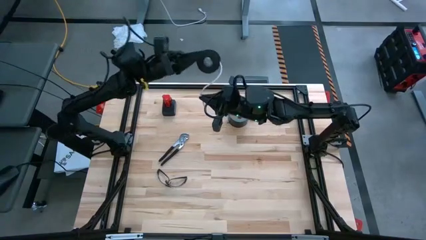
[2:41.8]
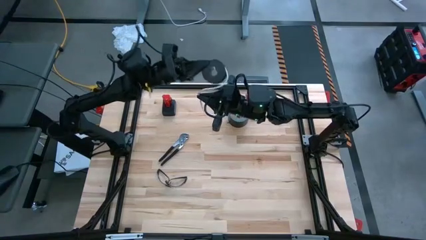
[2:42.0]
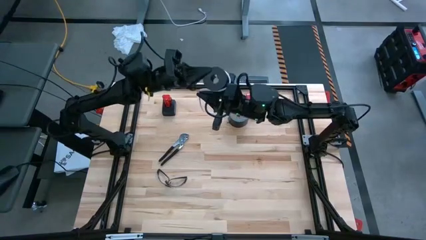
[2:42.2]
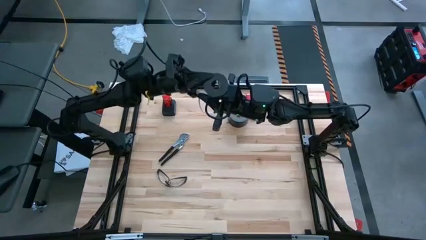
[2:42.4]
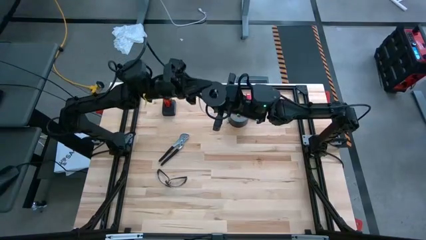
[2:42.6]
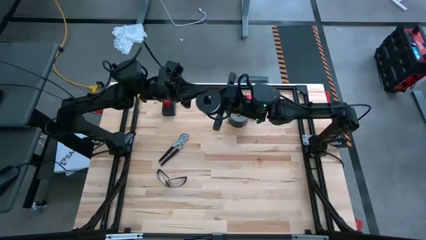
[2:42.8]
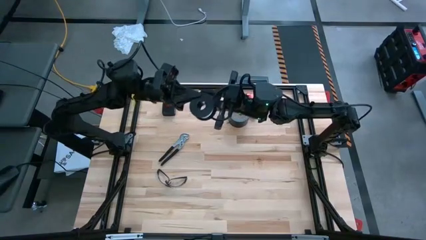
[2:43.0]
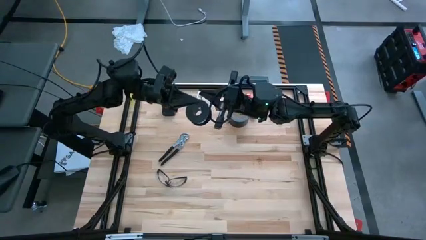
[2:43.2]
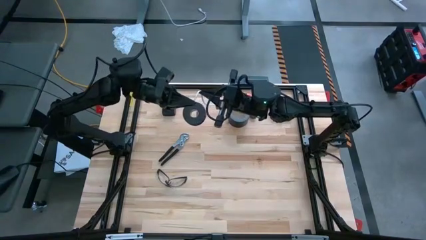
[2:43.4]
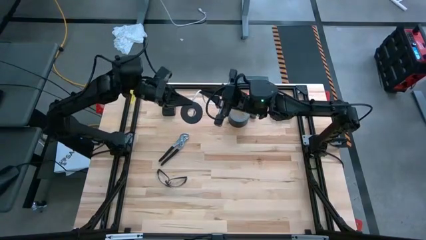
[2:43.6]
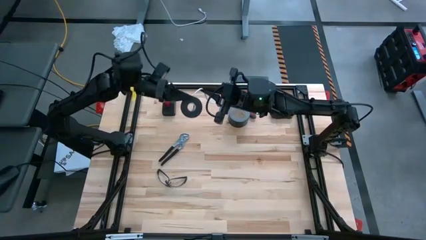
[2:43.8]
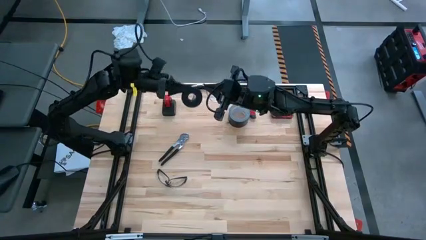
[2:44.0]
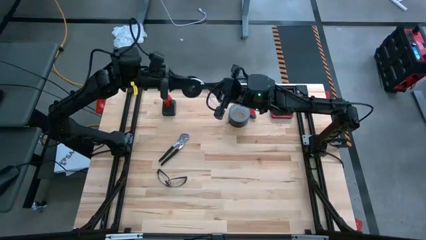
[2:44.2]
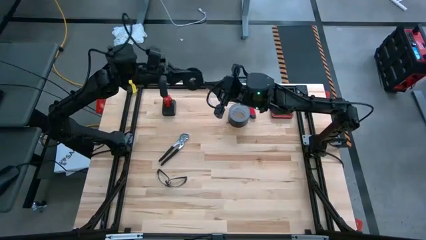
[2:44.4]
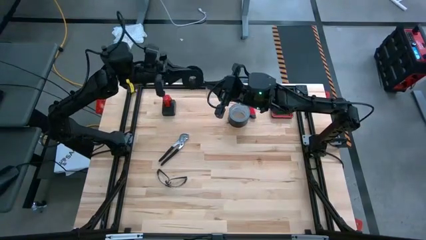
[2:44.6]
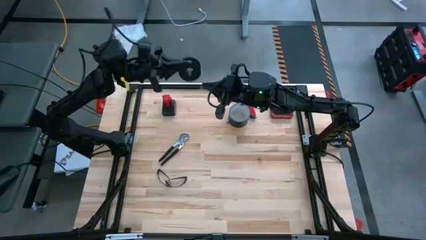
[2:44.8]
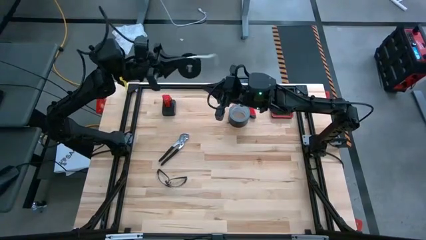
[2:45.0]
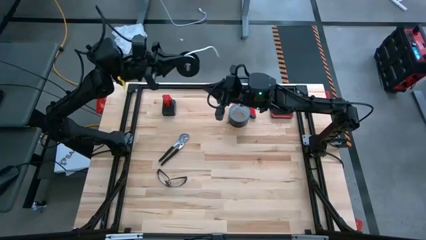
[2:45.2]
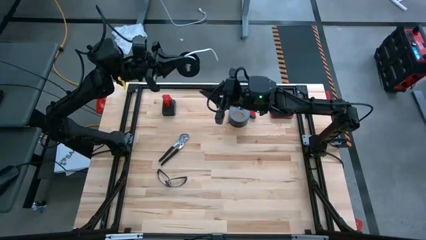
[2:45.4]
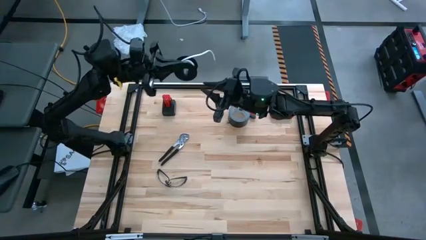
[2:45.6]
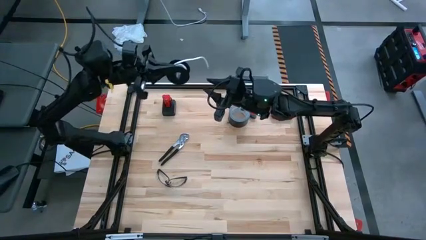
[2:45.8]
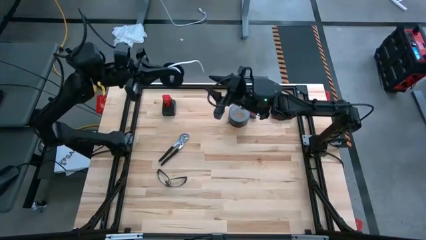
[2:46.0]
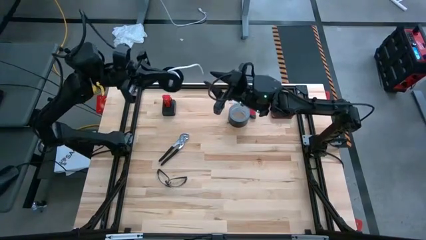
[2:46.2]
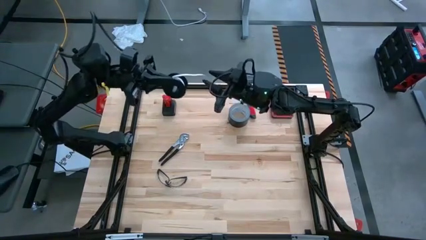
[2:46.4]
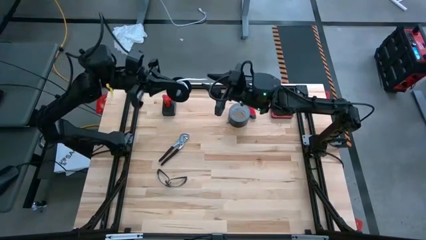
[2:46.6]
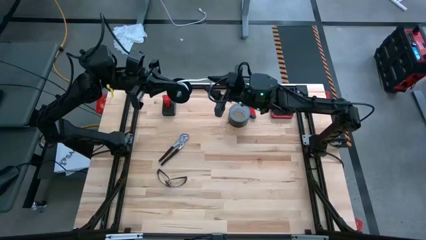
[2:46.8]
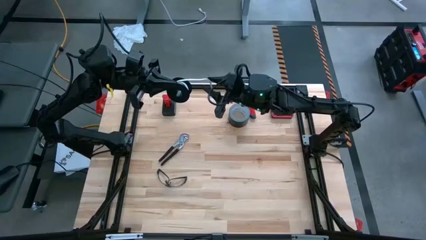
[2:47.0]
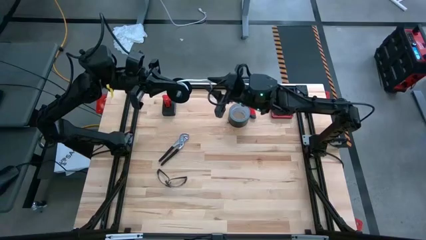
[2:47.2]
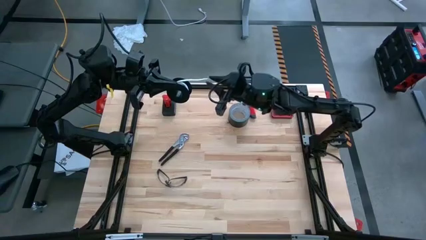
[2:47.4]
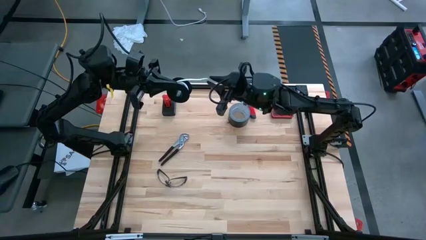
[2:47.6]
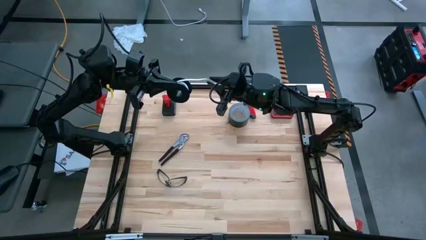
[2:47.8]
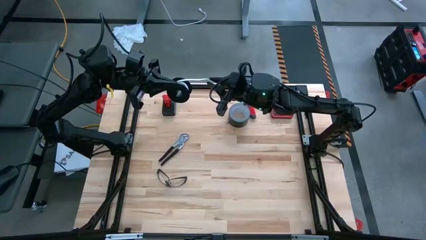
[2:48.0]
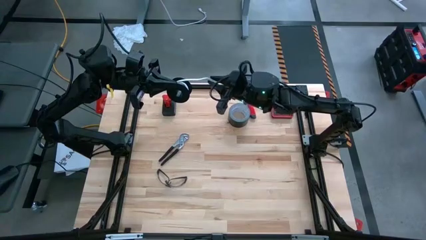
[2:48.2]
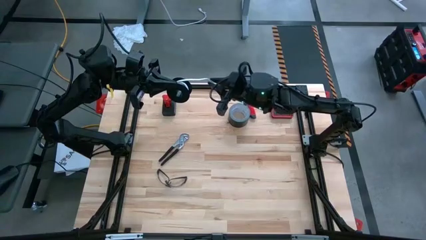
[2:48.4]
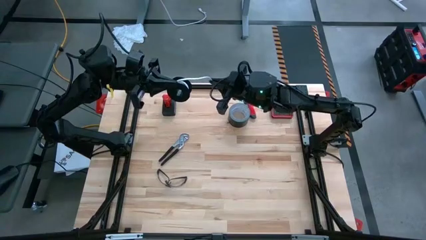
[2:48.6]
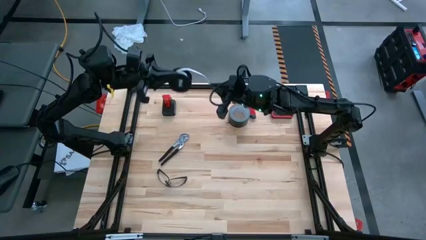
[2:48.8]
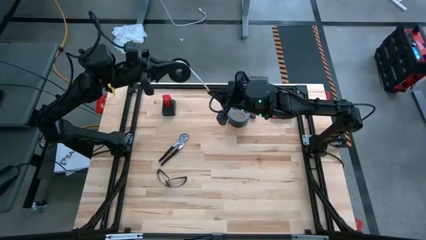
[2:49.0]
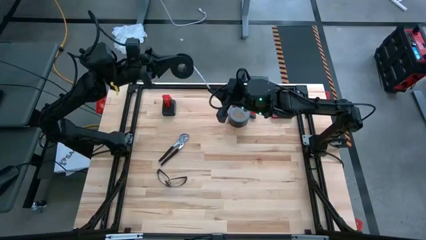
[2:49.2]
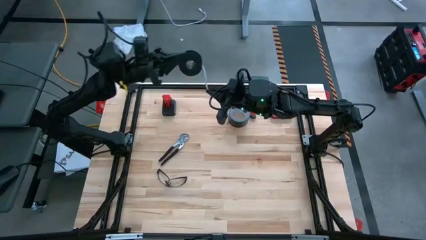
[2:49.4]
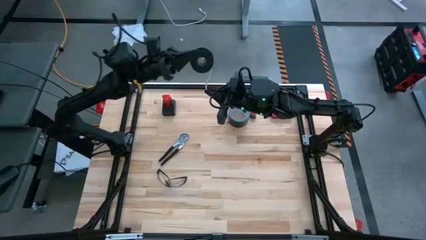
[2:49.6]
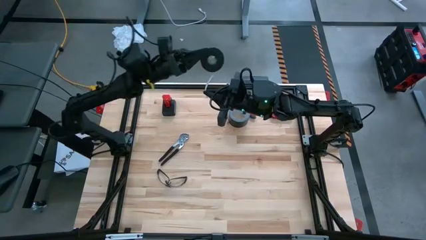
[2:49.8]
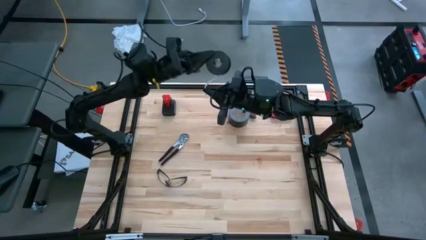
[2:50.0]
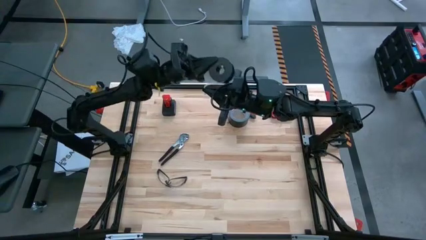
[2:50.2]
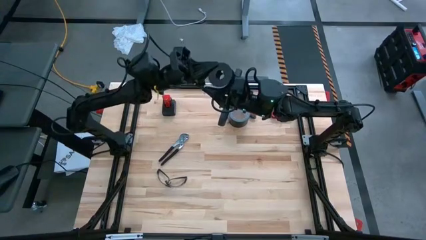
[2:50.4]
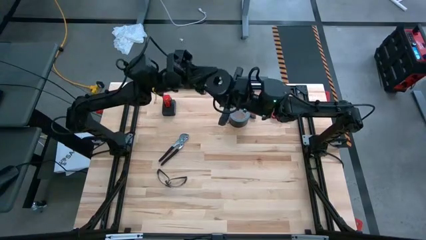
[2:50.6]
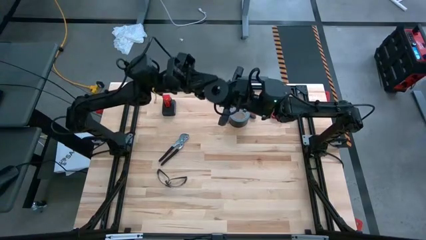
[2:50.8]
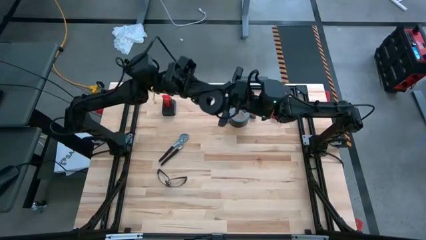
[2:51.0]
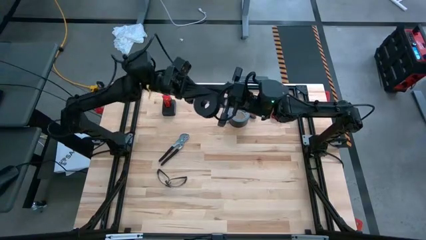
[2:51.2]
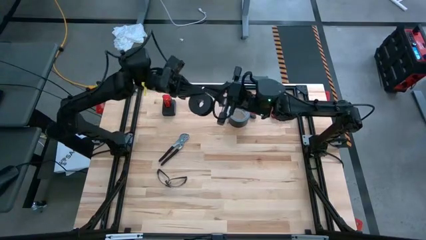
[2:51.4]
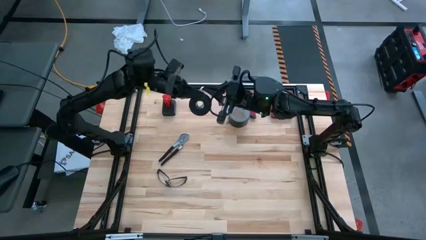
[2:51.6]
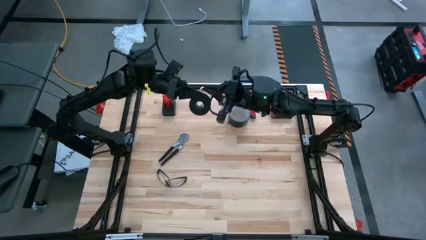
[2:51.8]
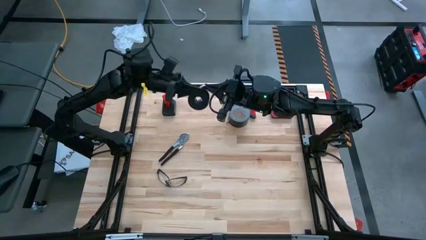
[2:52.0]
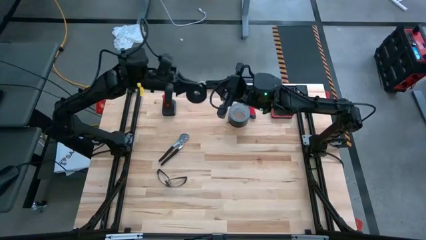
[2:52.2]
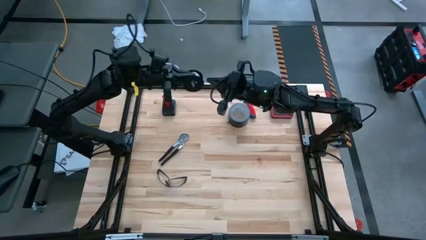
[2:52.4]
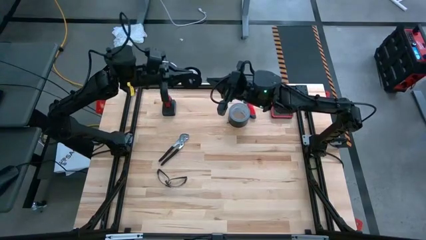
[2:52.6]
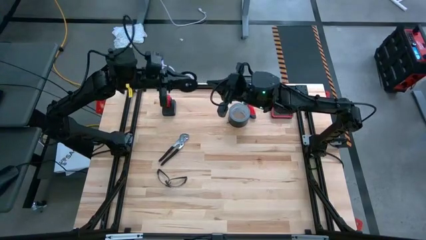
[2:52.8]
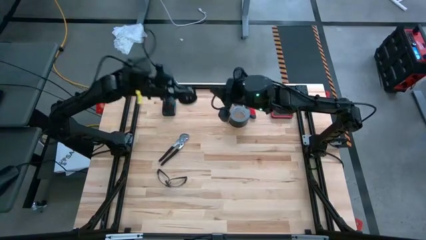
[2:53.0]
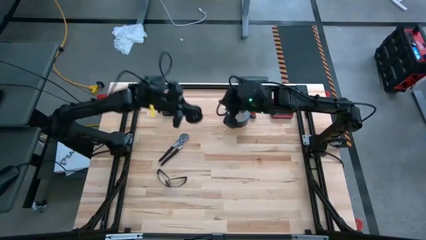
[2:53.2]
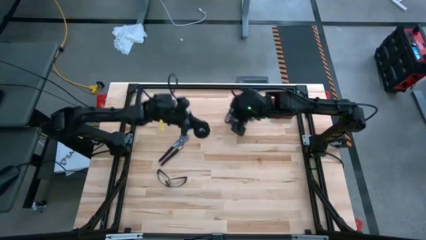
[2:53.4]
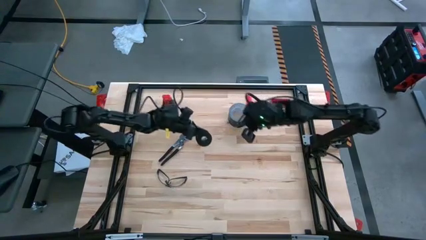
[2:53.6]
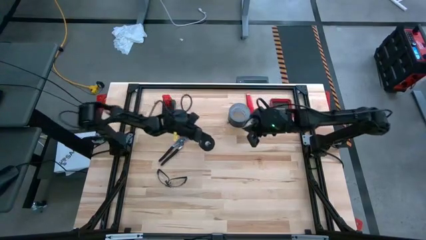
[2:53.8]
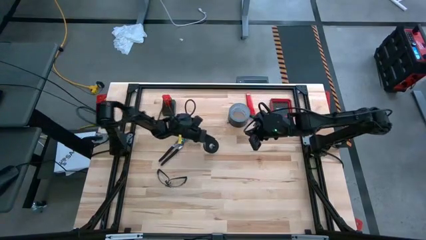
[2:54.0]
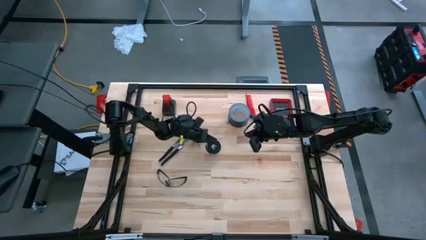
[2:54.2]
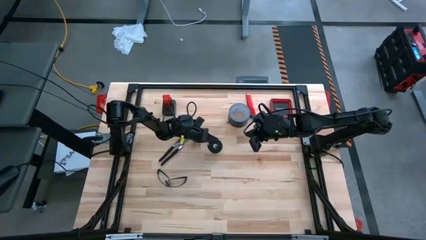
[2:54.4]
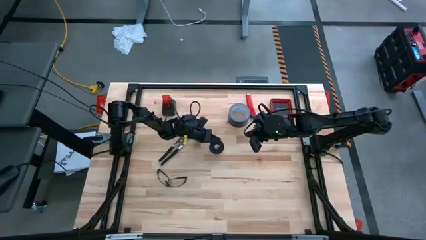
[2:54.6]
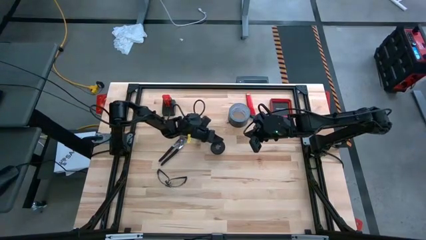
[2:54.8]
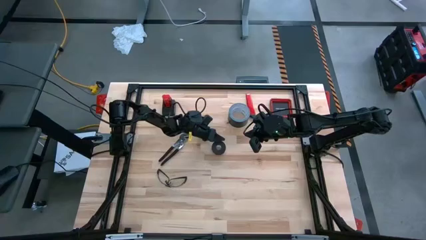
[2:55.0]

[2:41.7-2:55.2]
Task: Coil cords
Coil the white wire onto the black spool

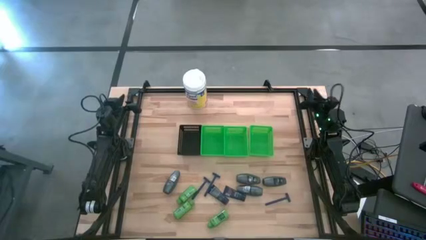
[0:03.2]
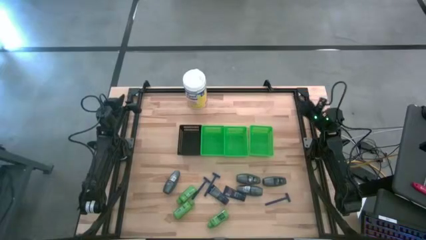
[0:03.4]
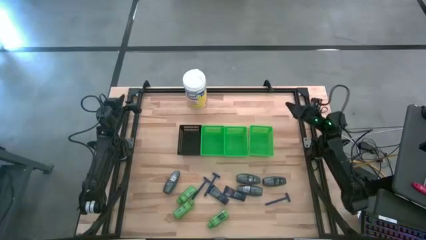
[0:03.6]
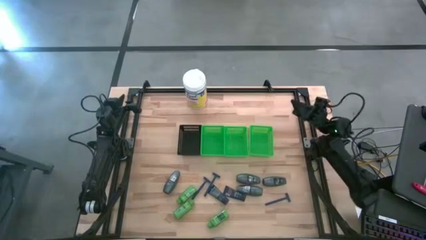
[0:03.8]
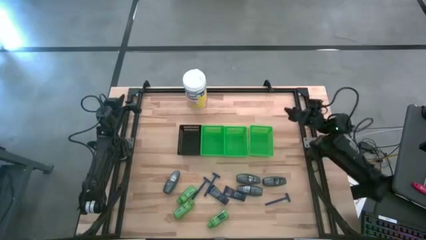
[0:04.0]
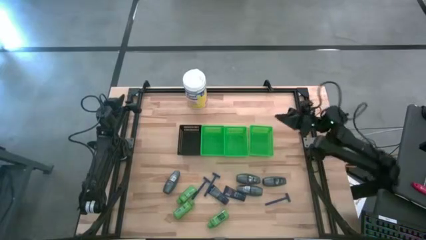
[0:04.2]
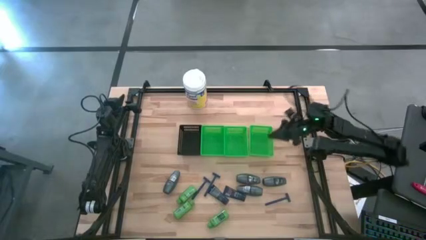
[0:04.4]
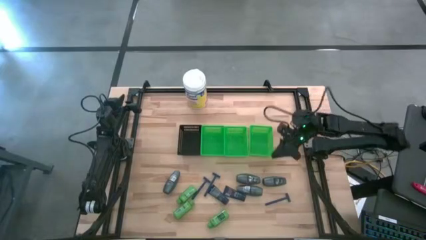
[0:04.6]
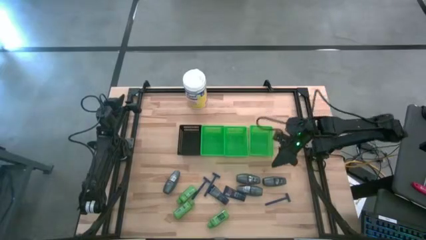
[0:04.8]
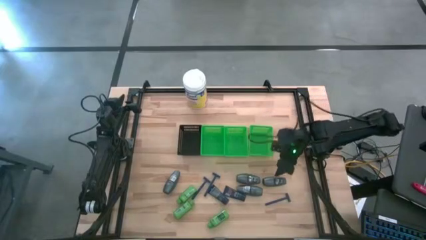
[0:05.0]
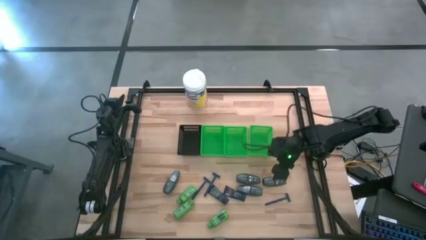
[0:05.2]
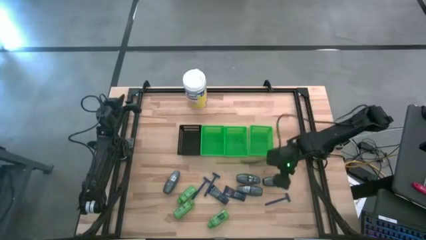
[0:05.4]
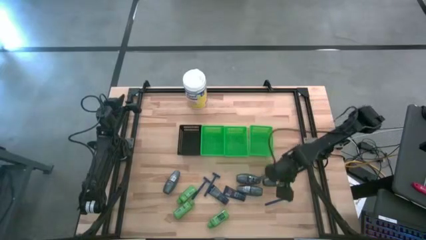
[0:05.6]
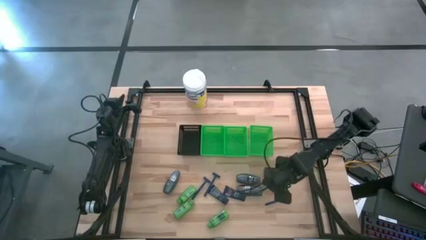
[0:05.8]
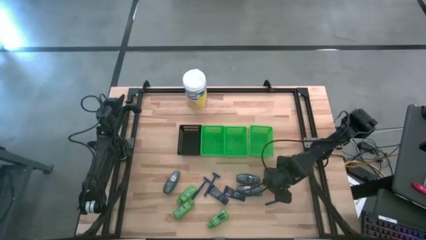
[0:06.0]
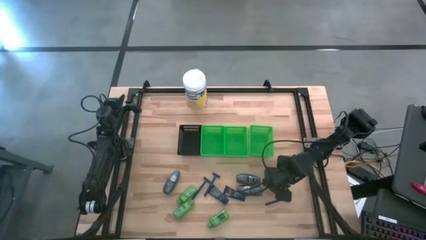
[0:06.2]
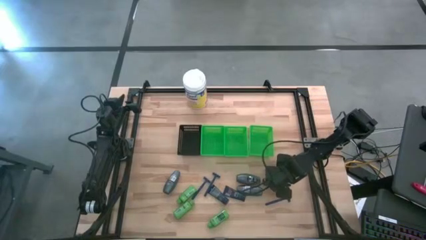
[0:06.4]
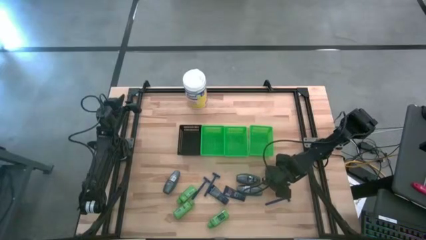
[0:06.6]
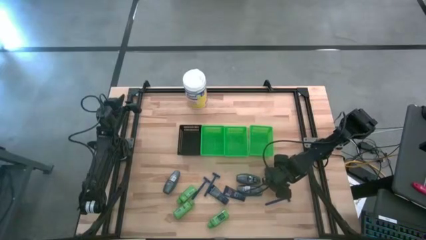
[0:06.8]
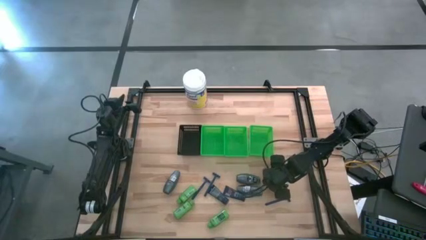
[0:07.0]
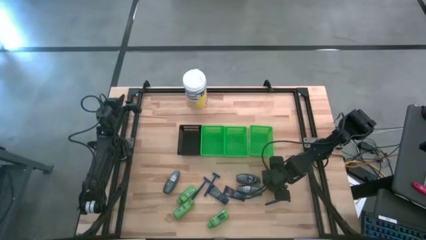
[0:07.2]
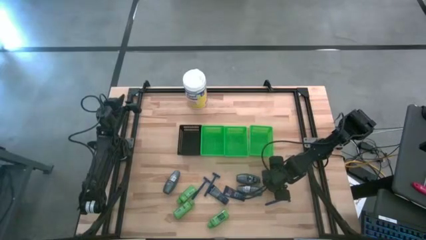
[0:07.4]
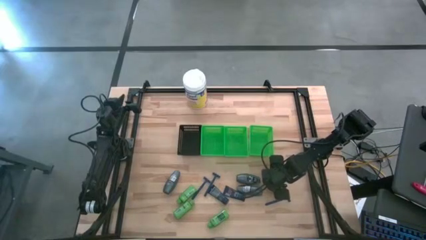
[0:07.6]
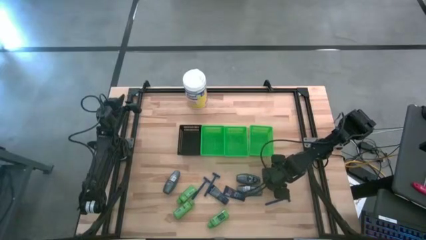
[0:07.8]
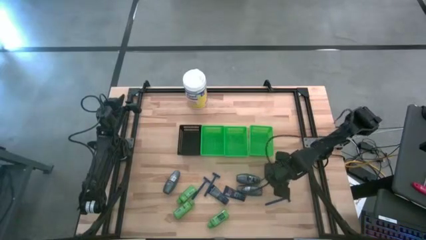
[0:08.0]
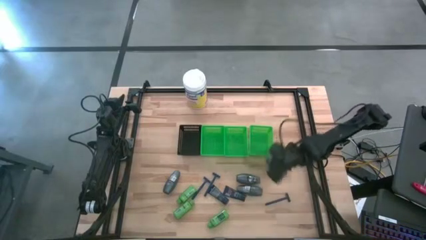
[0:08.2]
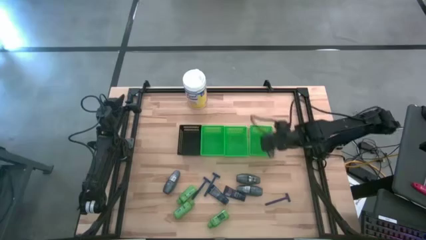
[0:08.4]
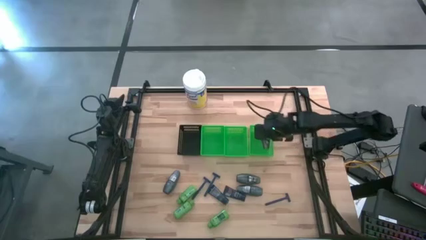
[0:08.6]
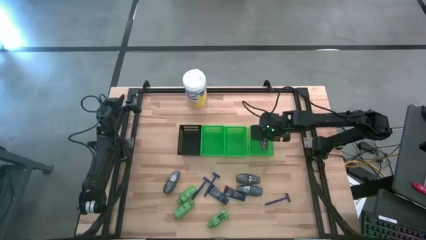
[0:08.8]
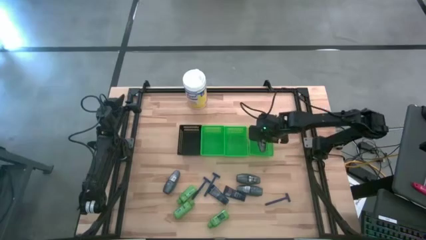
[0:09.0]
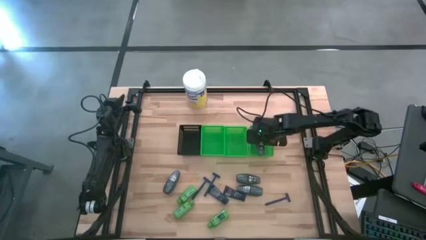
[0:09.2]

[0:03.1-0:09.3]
Task: Pick & Place Travel size toiletries
Put the deodorant into the right green bin
